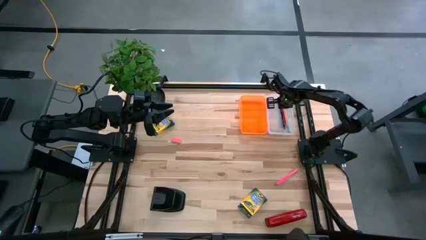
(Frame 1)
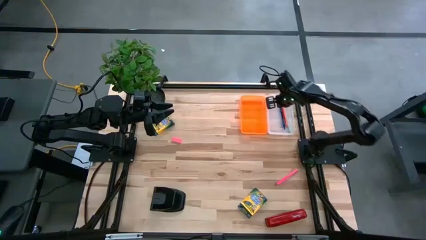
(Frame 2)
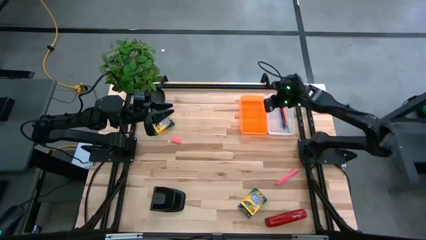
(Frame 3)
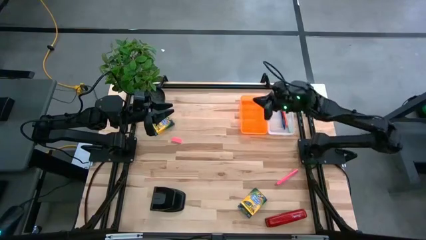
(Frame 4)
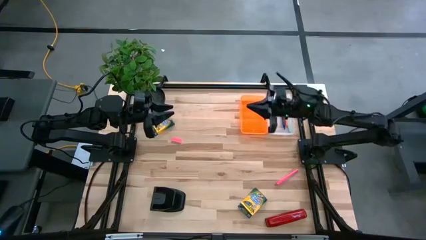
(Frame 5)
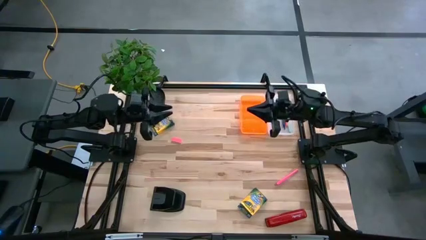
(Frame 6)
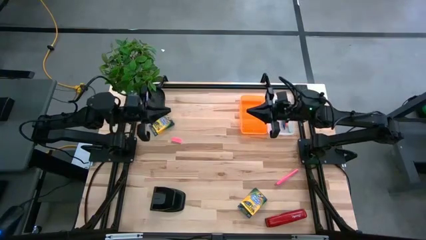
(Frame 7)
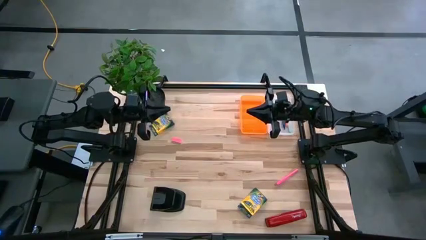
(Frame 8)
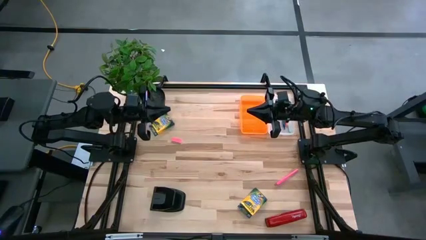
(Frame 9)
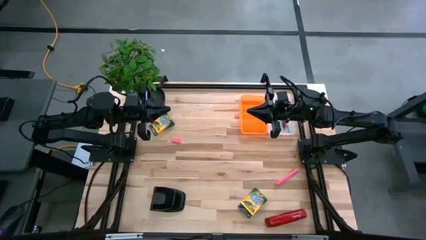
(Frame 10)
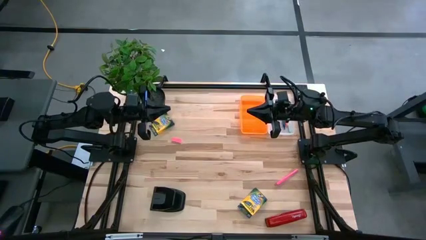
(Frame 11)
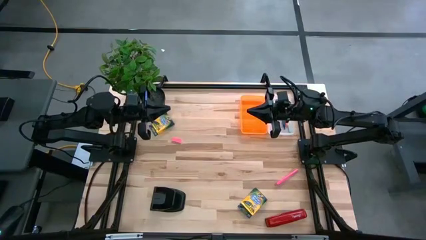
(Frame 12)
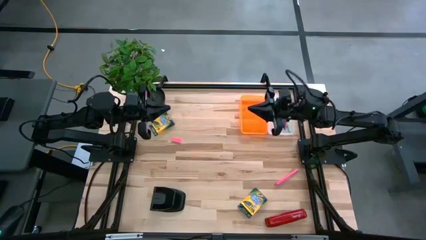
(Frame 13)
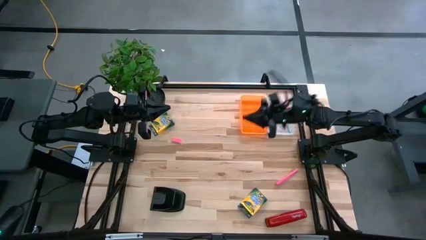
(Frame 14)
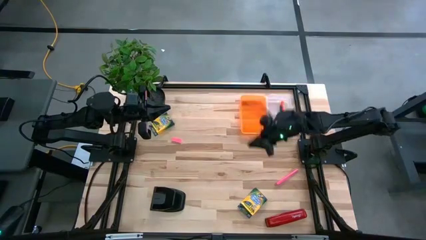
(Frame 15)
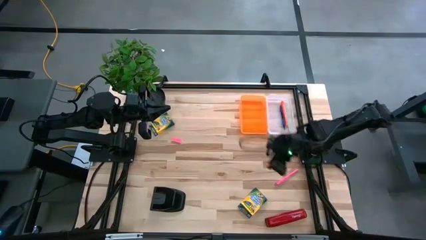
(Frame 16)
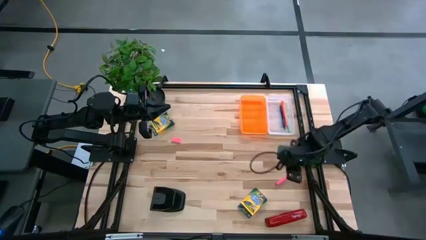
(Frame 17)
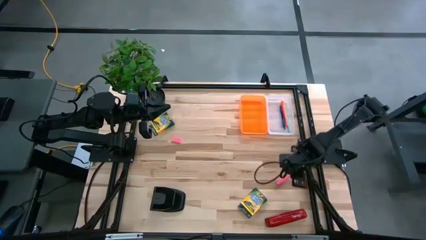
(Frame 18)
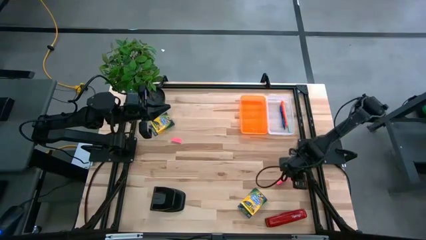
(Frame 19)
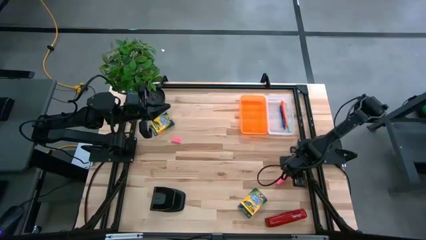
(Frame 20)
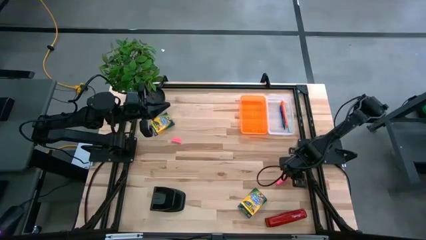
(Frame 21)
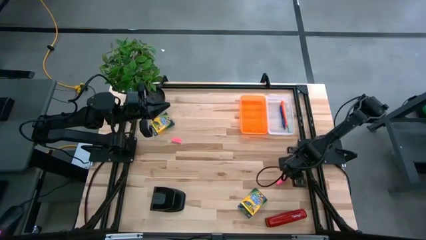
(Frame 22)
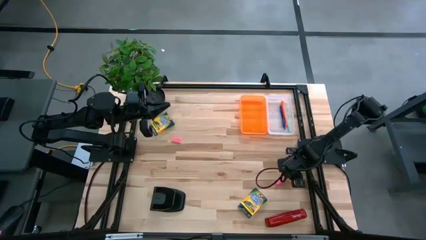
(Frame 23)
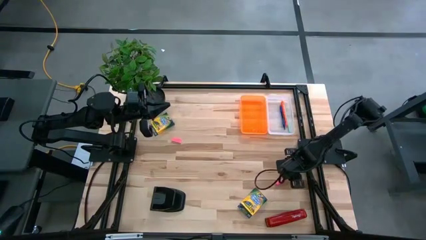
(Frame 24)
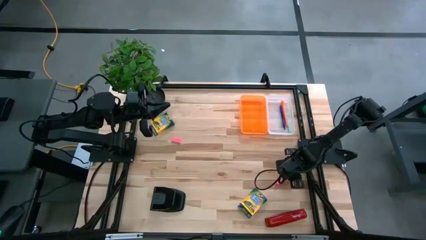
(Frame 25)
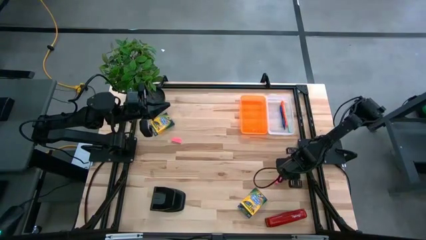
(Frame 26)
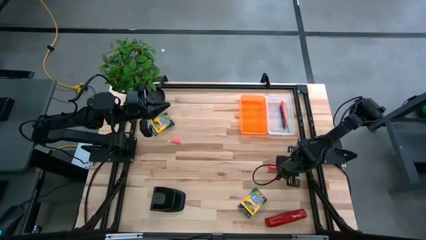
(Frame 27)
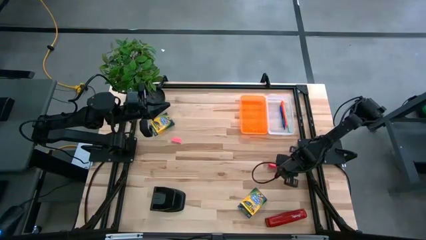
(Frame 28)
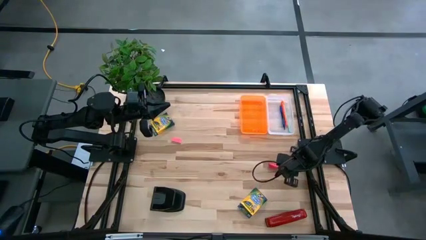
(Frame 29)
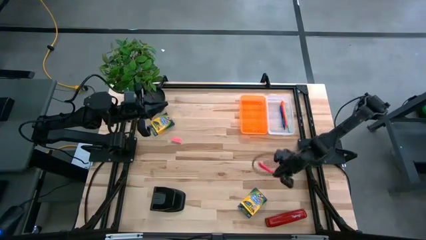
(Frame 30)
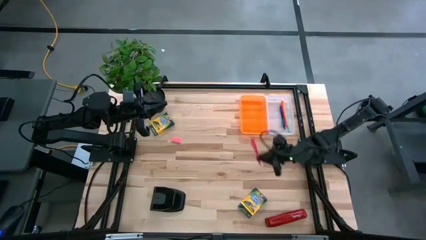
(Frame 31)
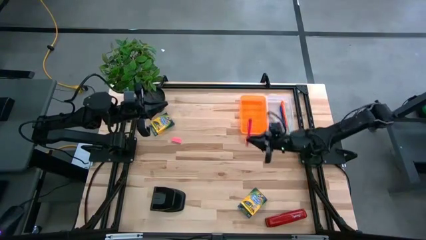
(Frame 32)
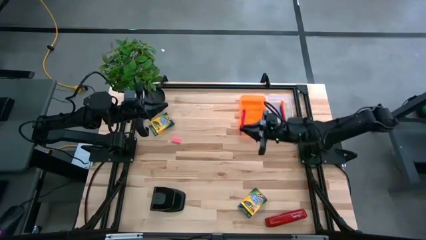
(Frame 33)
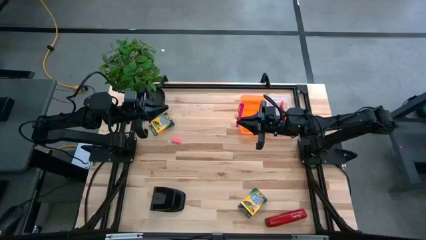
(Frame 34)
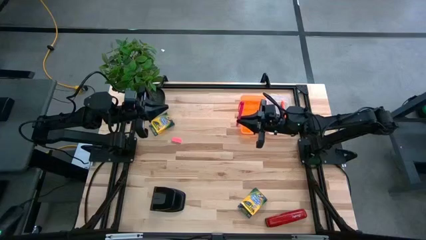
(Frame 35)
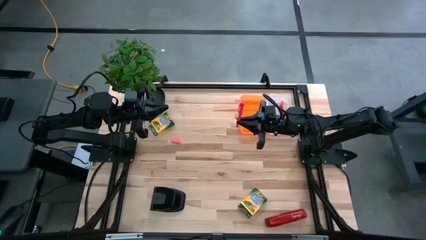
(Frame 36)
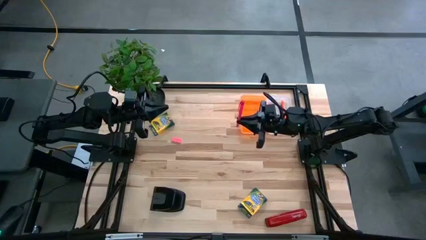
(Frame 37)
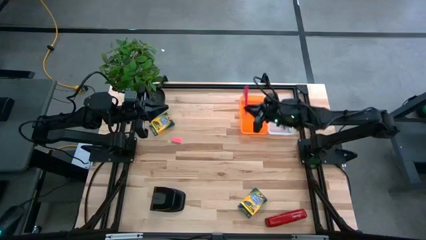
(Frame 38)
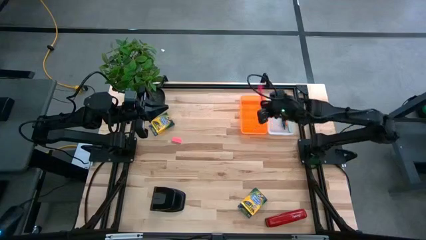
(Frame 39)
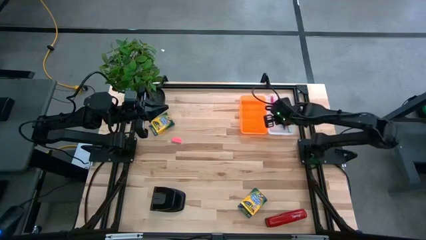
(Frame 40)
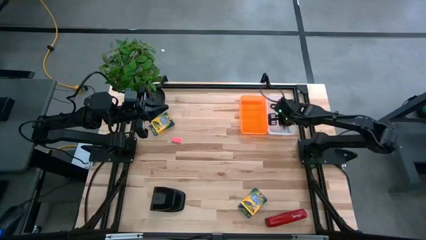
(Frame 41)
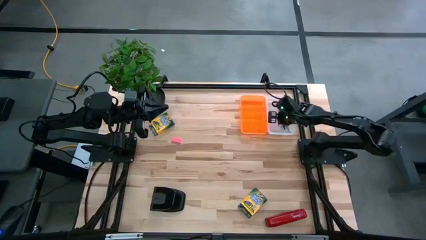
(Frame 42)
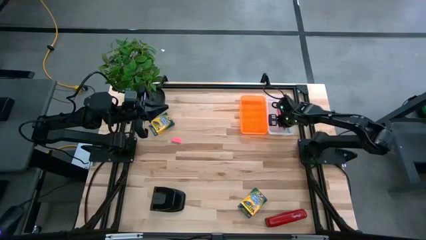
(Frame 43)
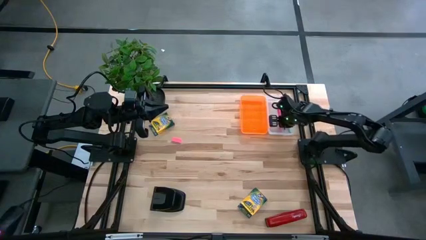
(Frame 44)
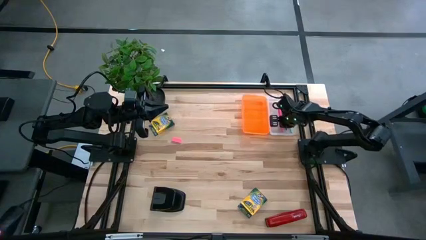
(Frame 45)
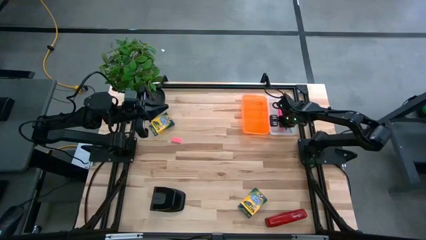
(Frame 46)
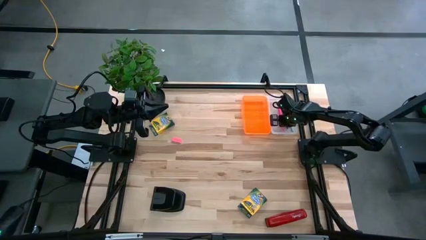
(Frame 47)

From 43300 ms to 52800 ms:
Task: Pack school essentials
Put the pink pen into the orange supply box

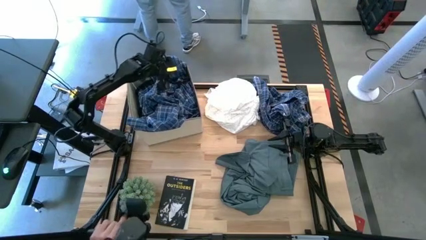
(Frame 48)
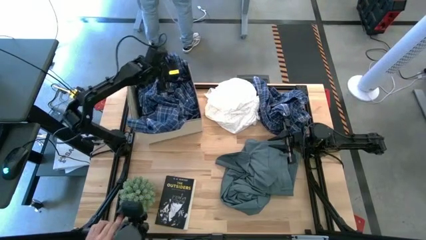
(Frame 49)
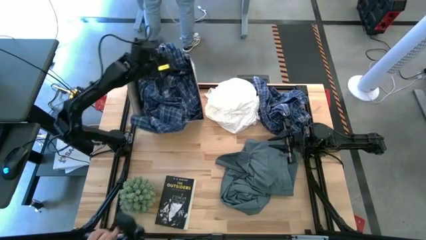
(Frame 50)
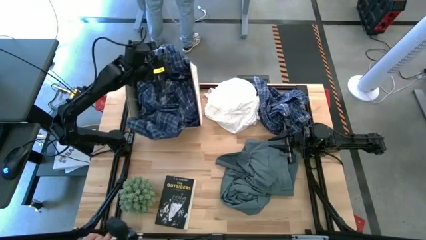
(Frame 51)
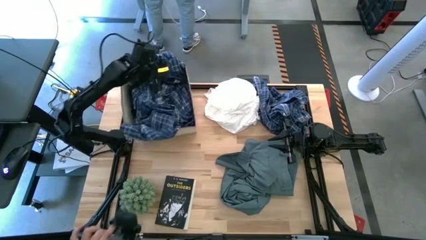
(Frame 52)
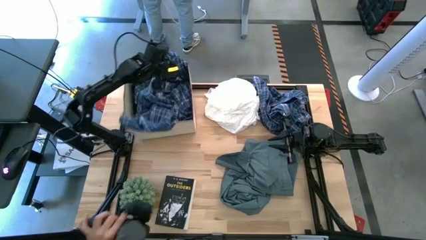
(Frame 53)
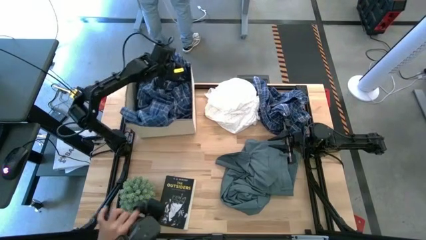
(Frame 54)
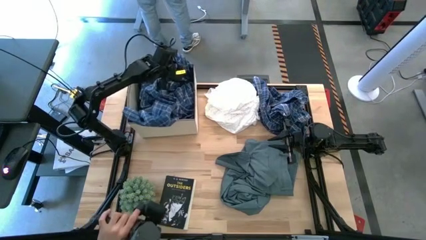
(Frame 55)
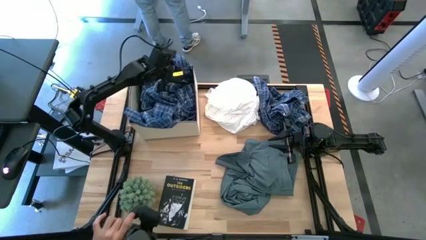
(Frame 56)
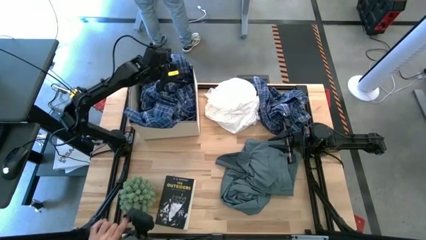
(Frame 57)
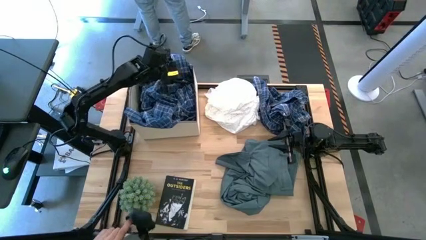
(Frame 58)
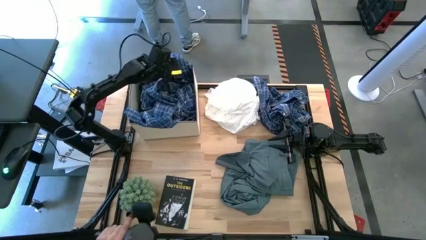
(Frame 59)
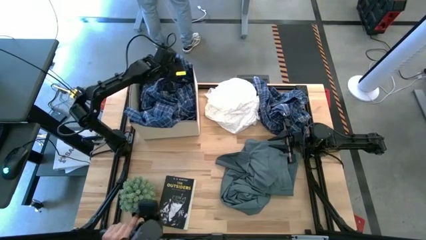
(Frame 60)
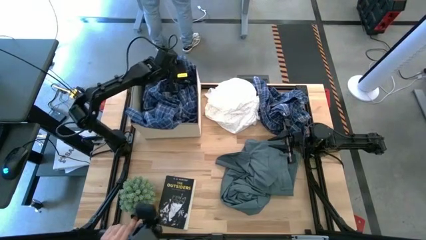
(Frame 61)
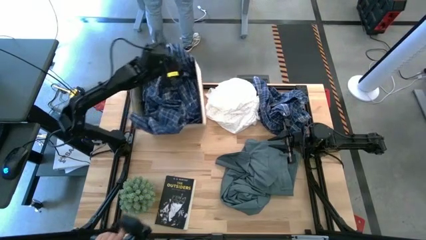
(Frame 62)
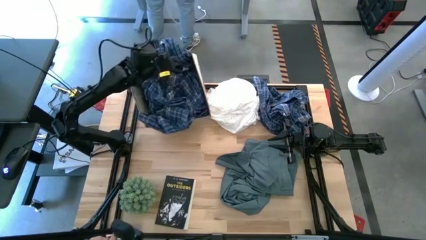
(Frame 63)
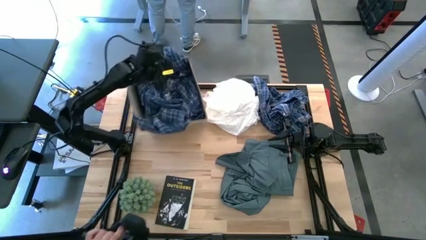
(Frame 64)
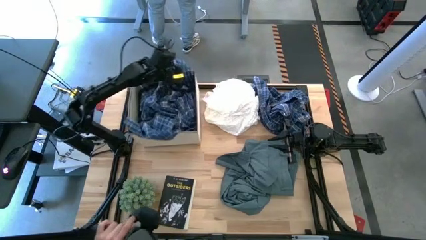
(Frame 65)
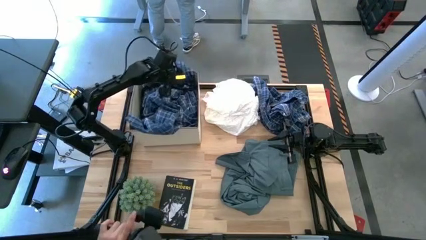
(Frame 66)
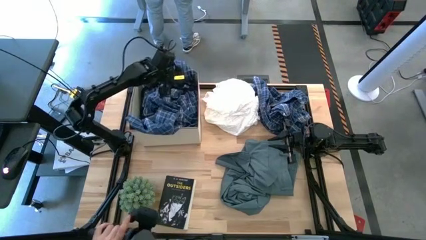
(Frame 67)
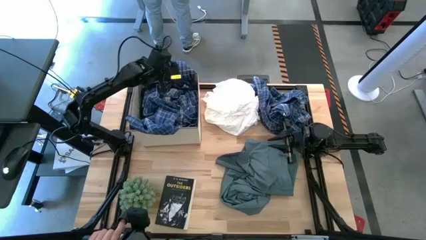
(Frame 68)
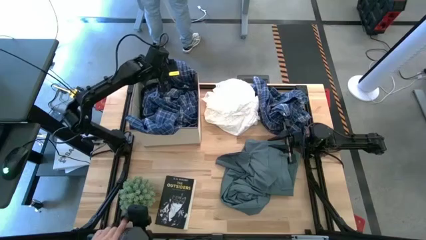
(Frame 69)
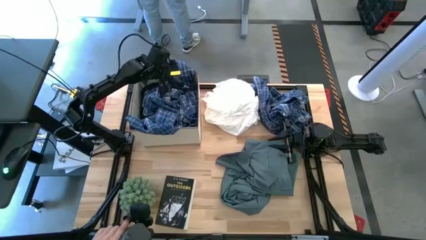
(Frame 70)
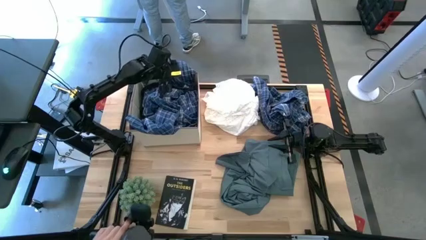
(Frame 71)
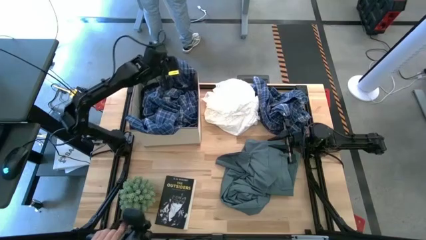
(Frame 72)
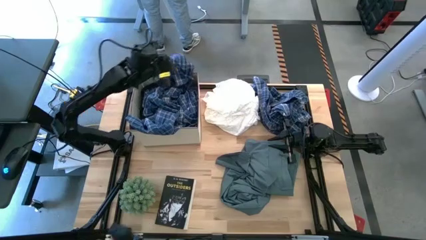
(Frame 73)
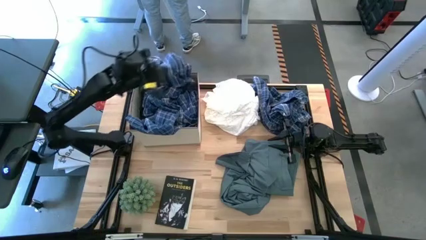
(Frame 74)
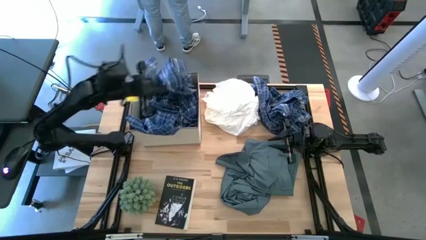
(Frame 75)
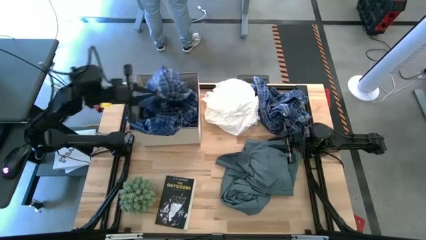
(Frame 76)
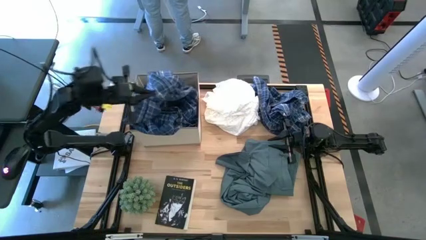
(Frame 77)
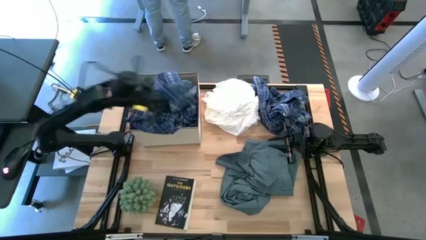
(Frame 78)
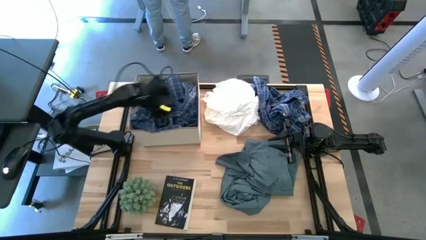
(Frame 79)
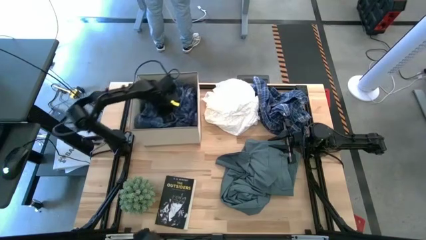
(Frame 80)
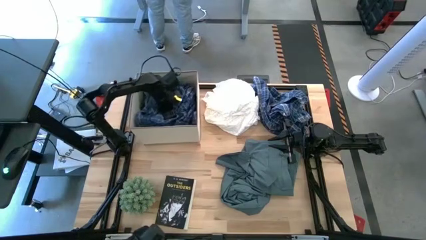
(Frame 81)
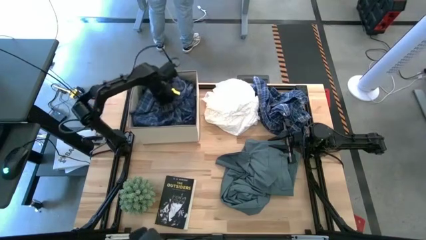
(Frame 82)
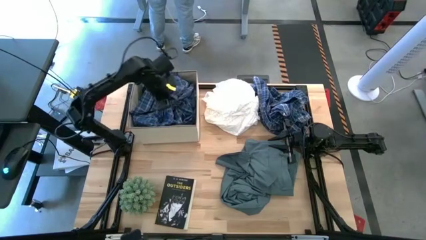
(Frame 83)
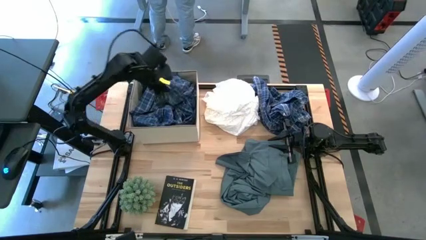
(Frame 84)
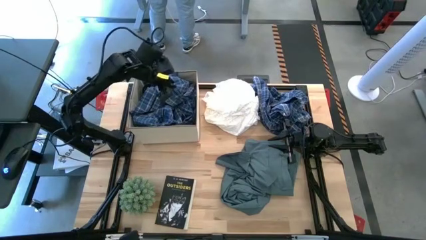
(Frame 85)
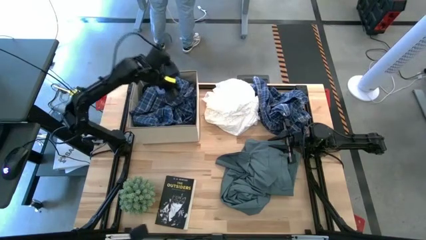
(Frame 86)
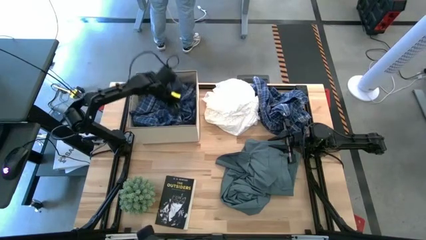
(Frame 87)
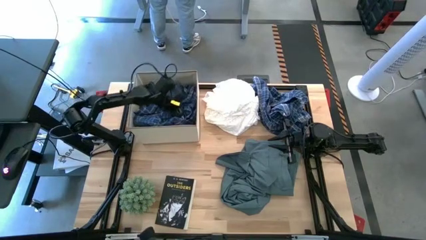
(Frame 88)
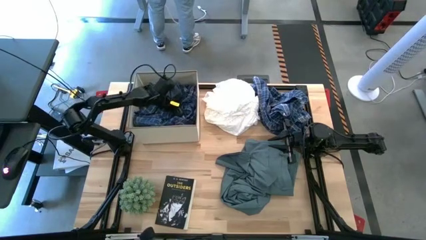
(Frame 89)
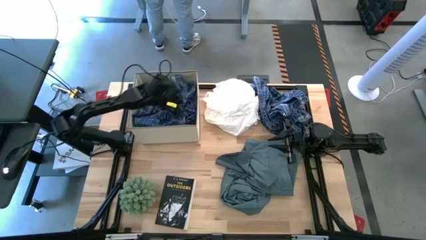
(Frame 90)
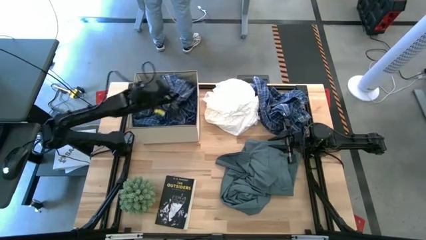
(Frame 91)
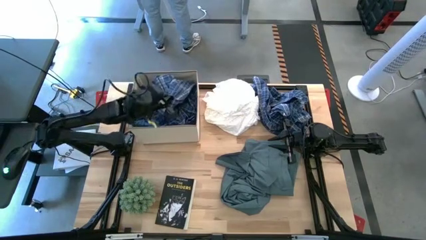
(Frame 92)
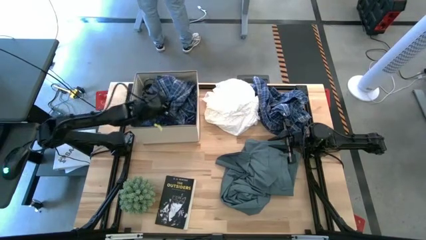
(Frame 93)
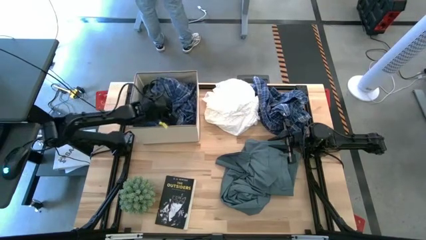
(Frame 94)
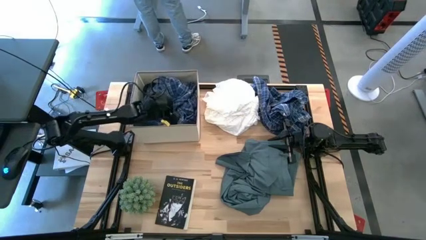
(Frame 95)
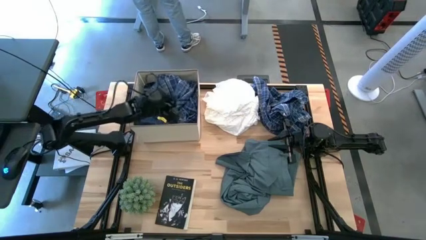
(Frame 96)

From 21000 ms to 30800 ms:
Task: Sort clothes
Put the bottom blue plaid shirt into the laundry organizer
